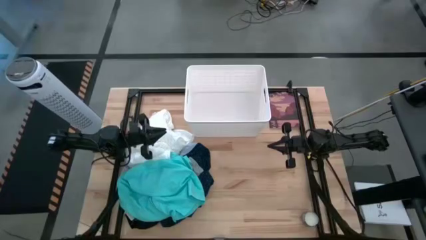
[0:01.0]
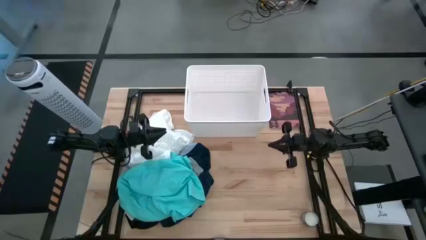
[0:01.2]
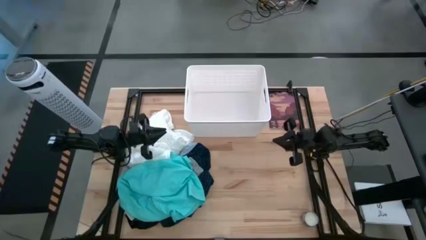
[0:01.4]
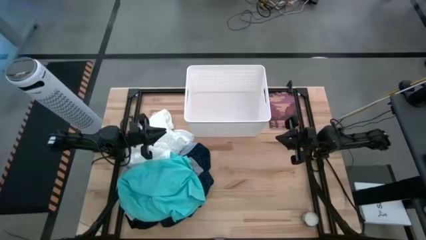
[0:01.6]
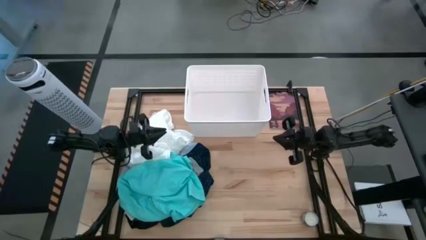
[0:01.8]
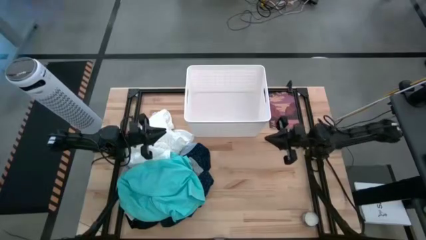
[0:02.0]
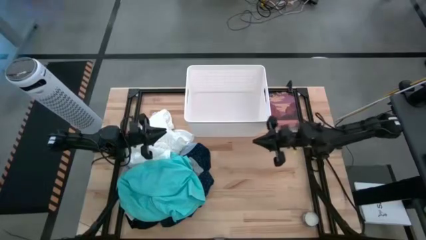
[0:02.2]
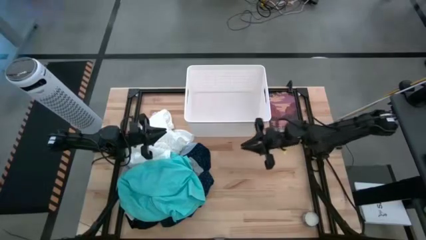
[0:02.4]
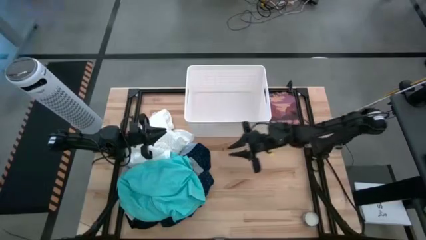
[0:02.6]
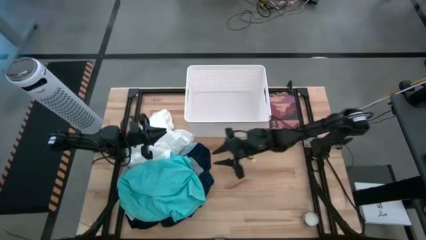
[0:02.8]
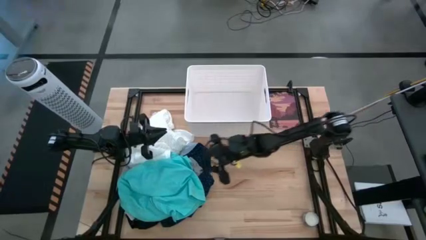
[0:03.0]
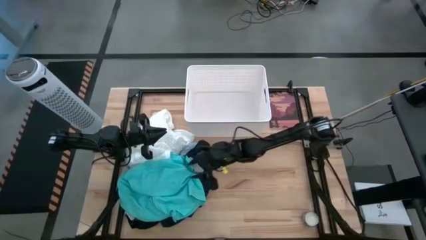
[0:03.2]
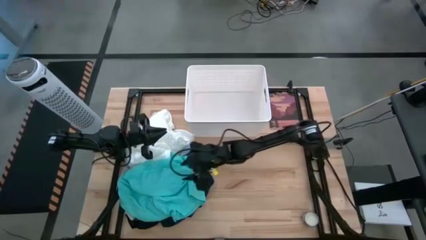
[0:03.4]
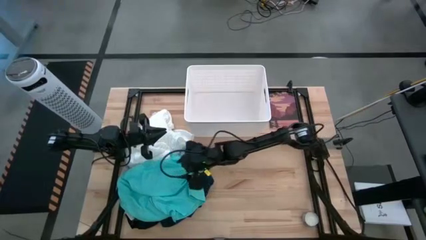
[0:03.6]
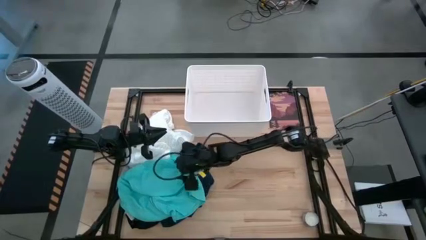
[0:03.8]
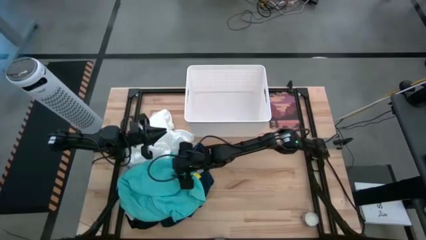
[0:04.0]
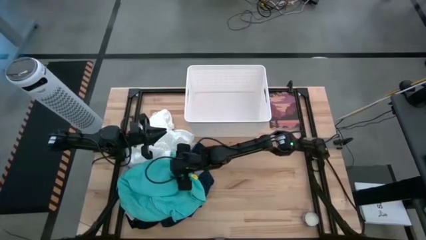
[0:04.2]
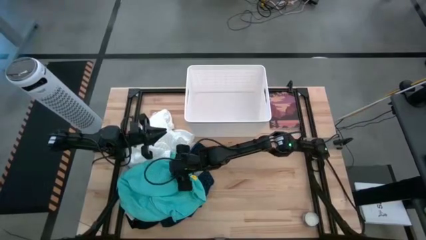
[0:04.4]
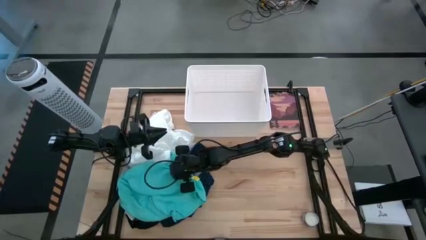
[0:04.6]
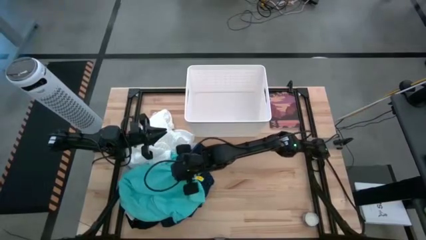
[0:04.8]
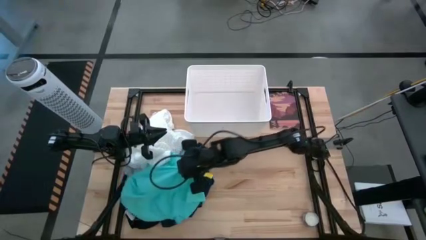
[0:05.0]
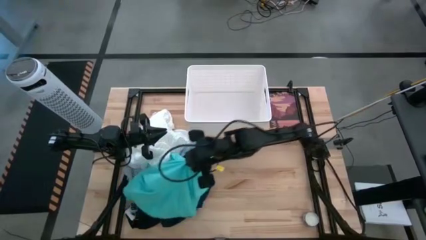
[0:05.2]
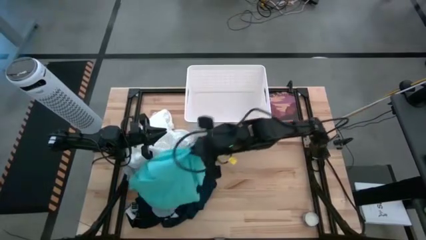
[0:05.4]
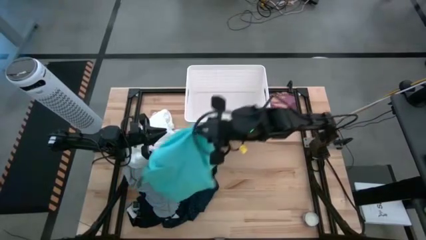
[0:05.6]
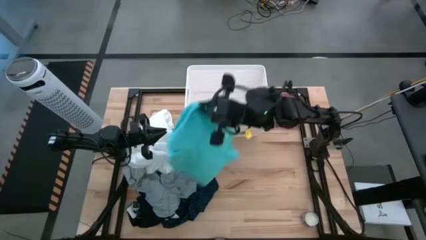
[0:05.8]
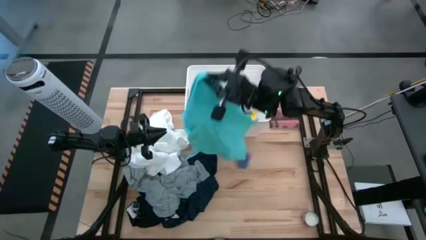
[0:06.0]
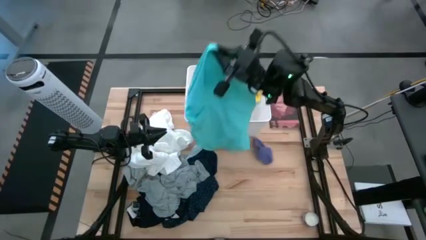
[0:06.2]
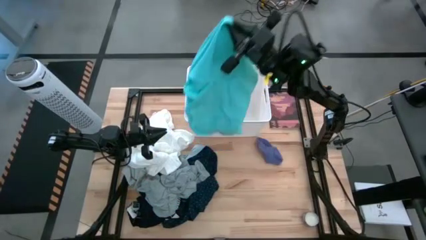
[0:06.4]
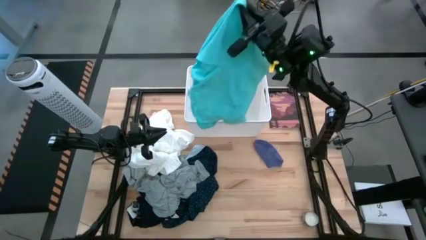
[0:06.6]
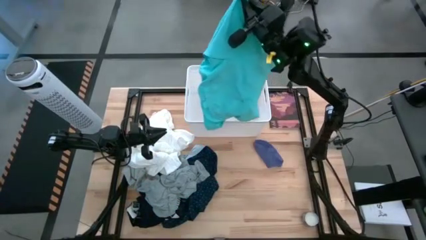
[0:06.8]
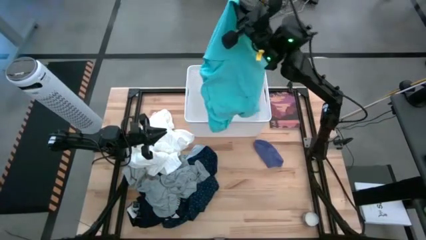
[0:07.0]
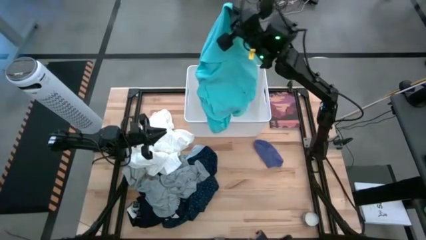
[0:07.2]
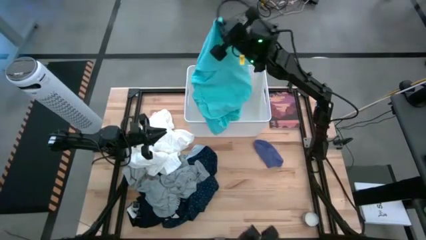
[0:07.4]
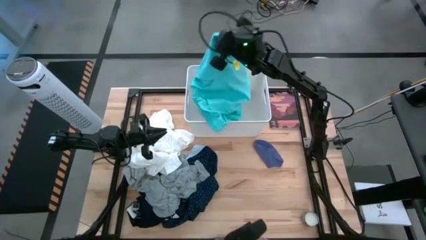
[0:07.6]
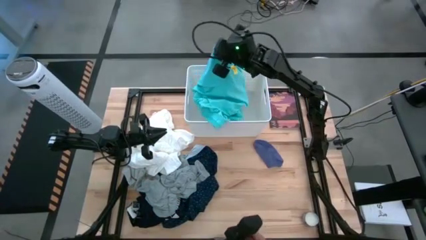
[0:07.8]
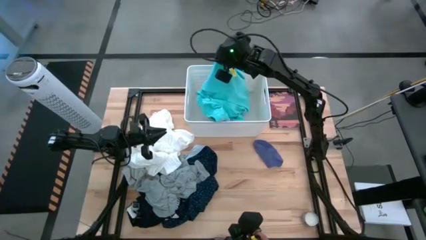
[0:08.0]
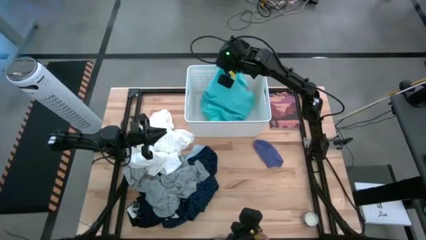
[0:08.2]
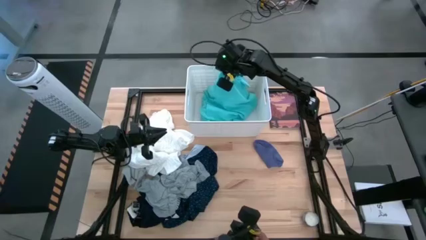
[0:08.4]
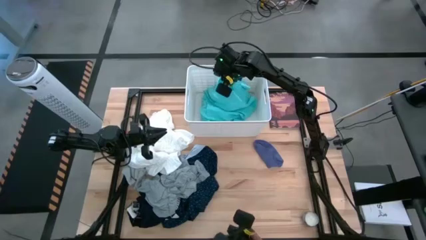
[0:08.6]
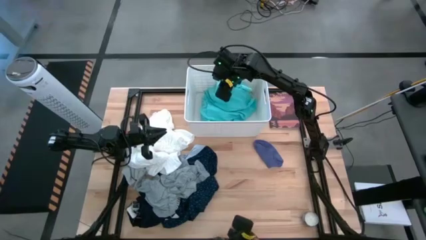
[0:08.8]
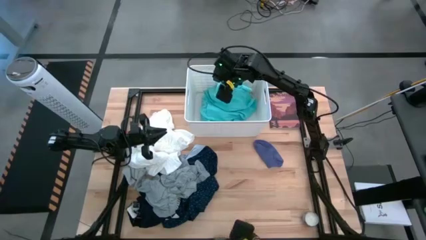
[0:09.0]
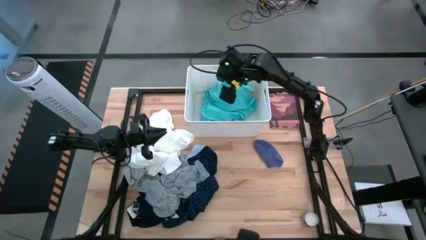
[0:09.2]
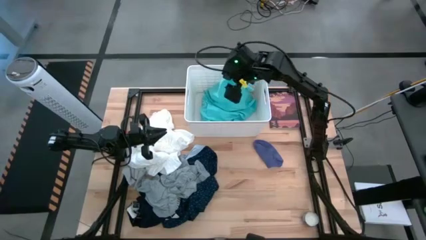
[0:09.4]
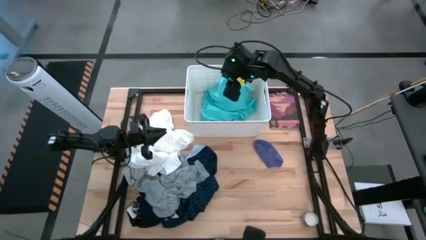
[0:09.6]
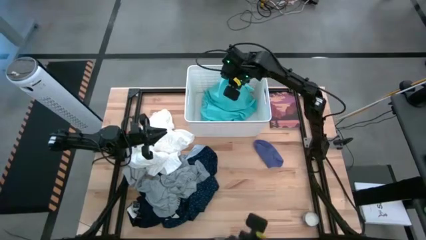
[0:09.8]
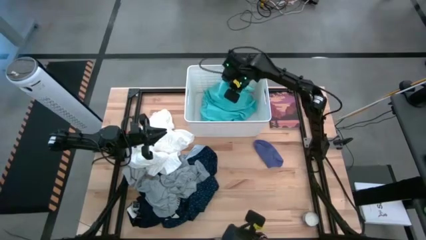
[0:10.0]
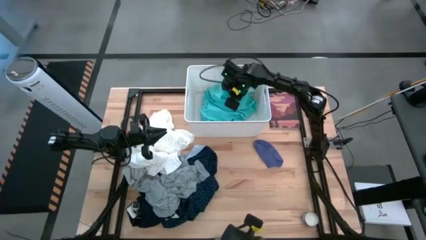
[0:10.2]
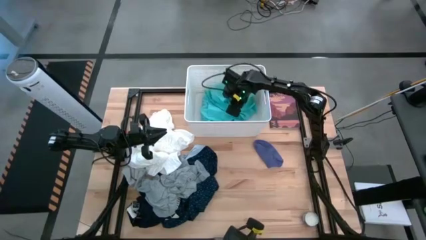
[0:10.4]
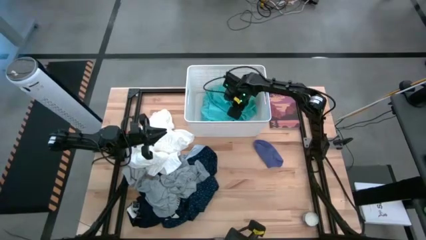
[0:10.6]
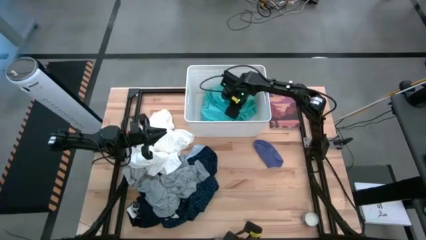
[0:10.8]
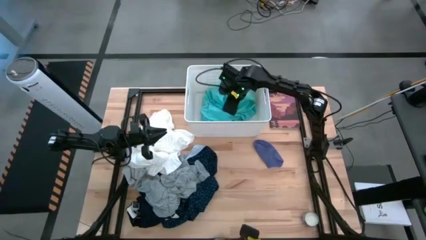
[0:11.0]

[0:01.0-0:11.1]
Task: Sort clothes
Put the light blue shorts into the laundry bin

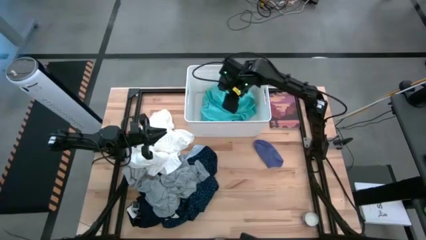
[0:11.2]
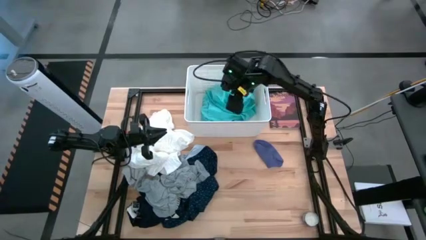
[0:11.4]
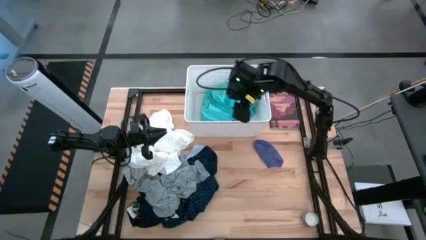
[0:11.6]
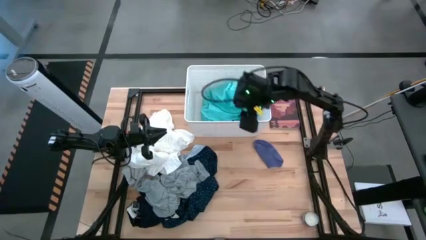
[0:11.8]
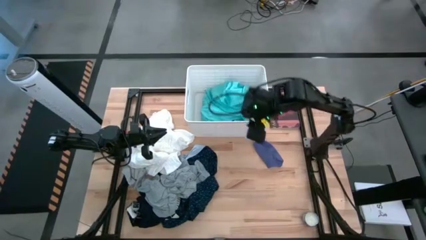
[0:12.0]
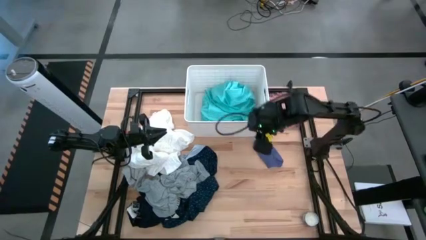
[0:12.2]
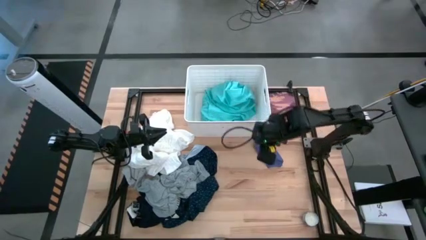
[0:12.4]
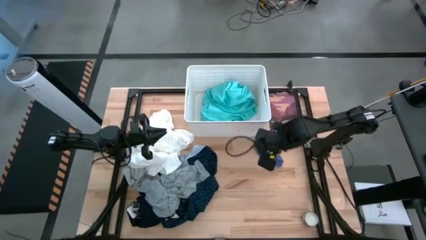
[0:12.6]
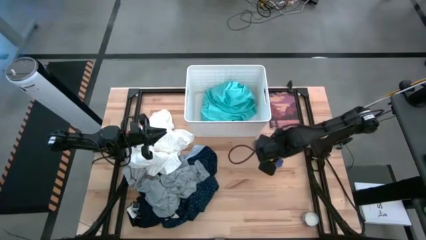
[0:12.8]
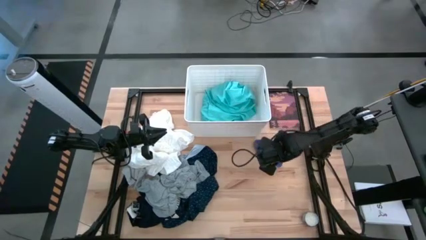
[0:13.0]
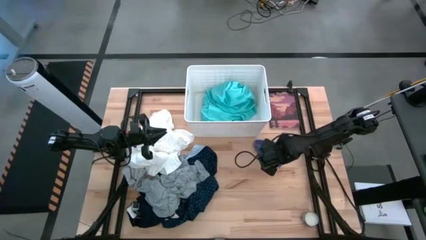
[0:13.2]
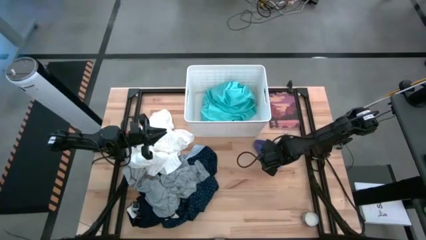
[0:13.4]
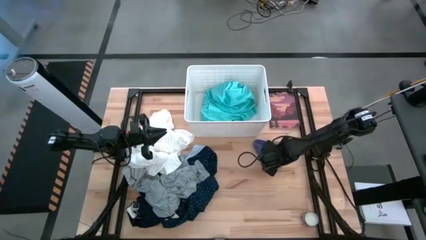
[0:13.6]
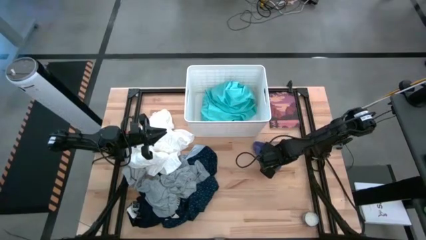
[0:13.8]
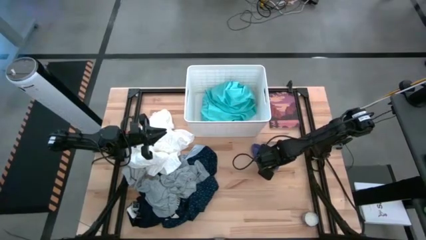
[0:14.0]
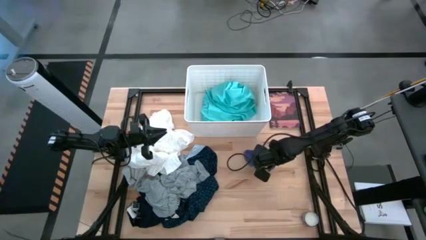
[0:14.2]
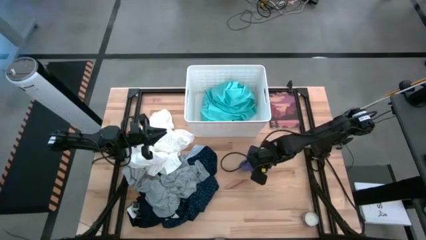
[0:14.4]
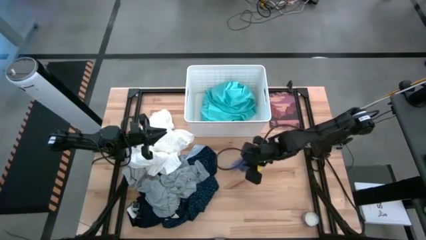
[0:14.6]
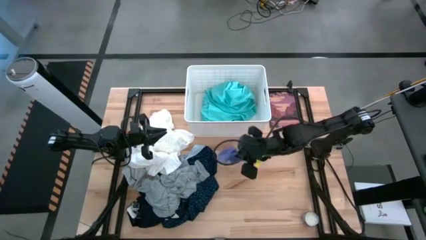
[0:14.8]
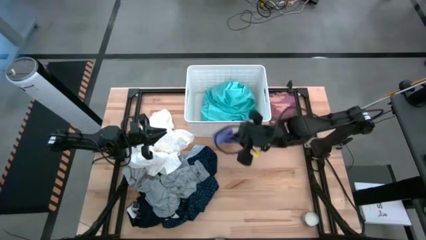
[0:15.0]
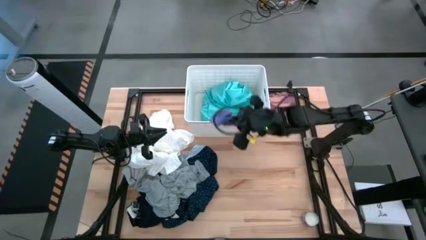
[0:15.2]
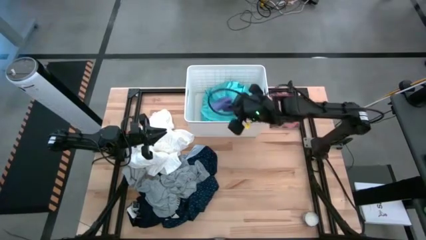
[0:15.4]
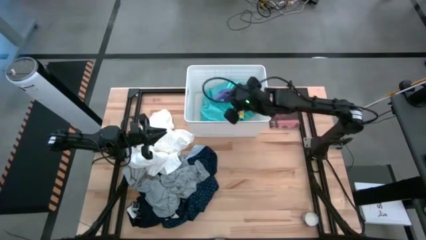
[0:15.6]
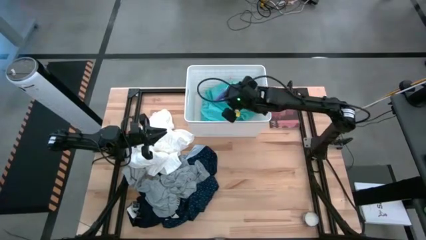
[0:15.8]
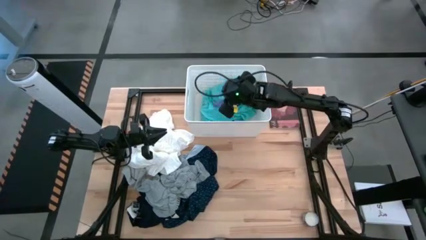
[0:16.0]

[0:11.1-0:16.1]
Put the right blue sock into the laundry bin
